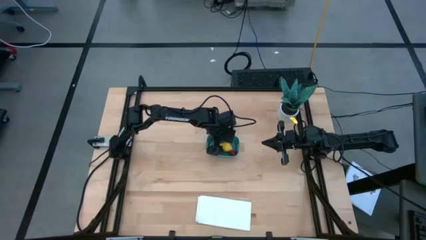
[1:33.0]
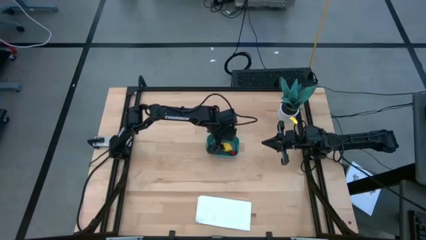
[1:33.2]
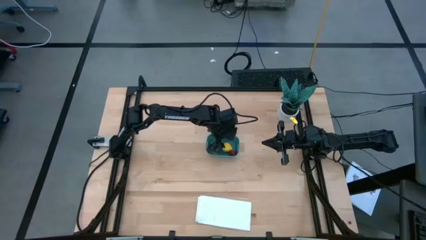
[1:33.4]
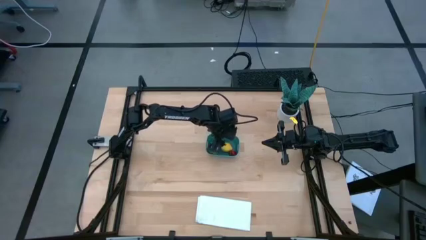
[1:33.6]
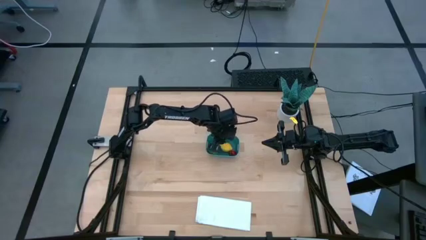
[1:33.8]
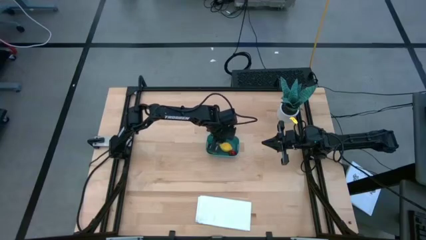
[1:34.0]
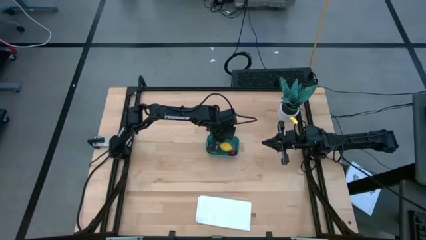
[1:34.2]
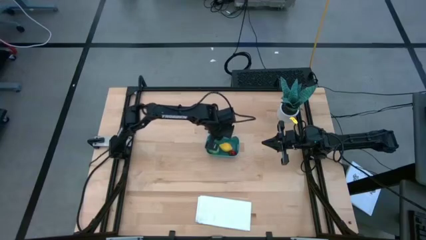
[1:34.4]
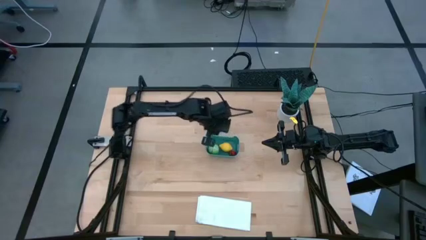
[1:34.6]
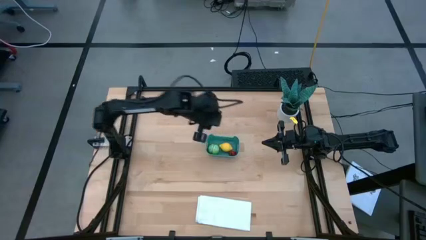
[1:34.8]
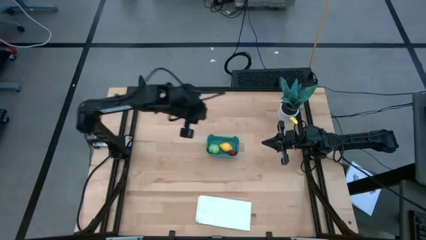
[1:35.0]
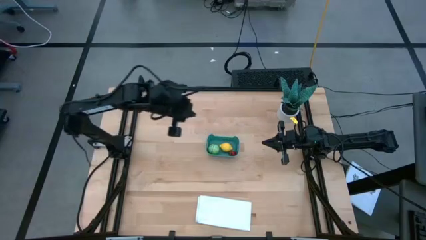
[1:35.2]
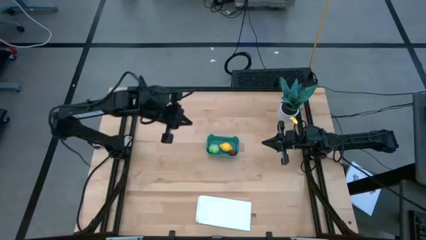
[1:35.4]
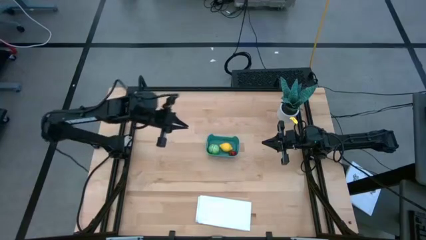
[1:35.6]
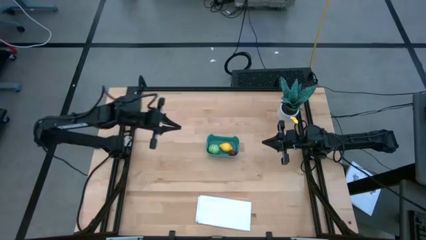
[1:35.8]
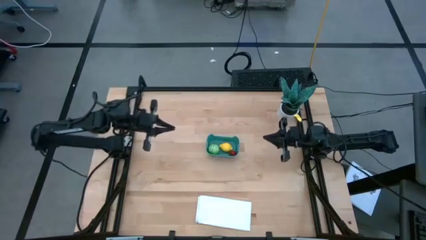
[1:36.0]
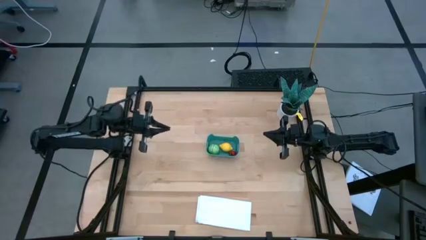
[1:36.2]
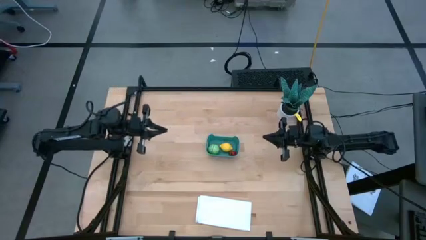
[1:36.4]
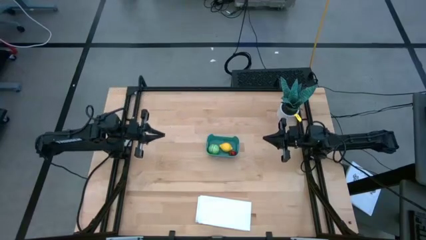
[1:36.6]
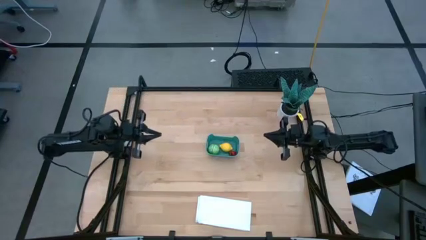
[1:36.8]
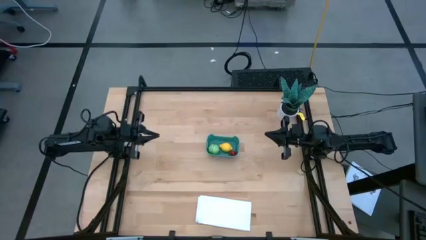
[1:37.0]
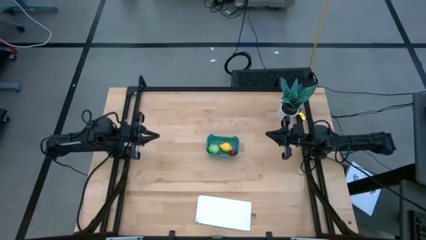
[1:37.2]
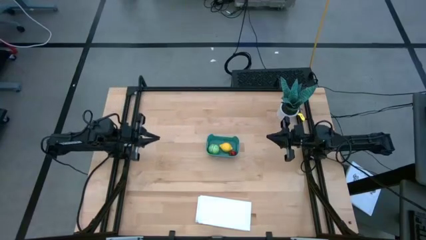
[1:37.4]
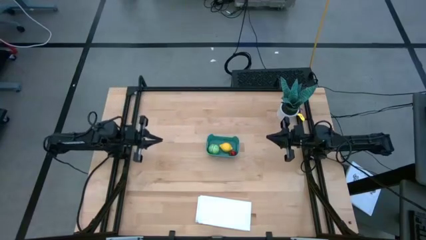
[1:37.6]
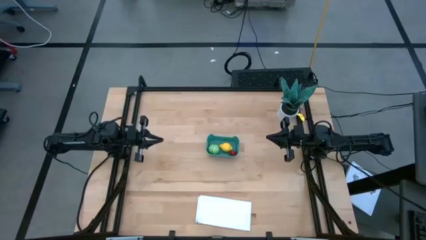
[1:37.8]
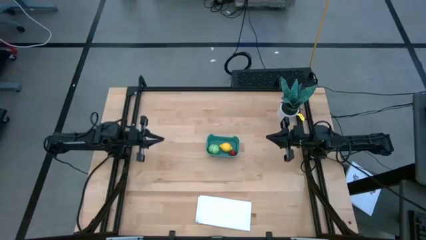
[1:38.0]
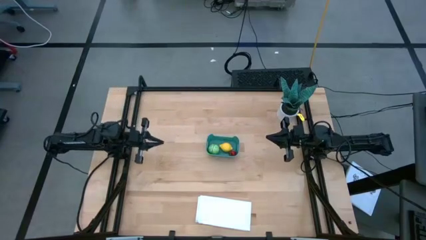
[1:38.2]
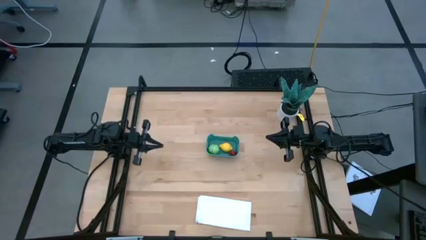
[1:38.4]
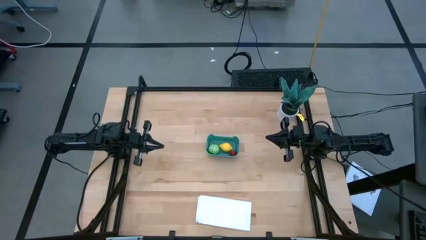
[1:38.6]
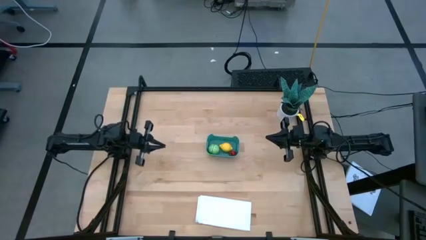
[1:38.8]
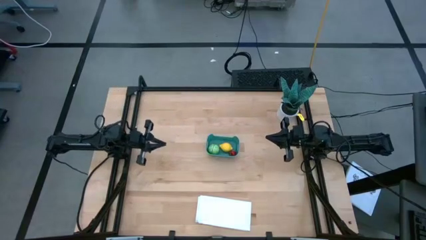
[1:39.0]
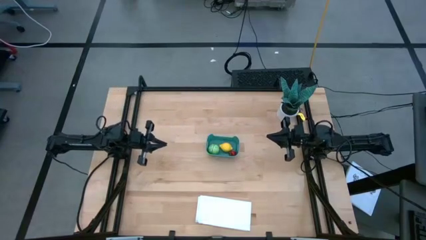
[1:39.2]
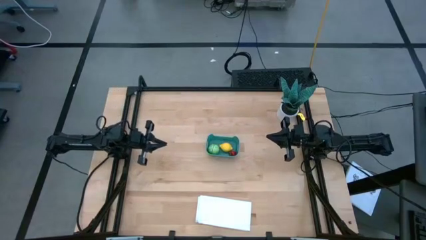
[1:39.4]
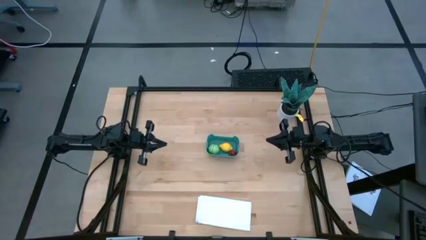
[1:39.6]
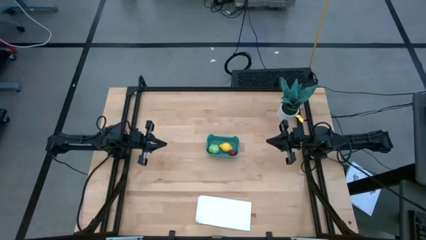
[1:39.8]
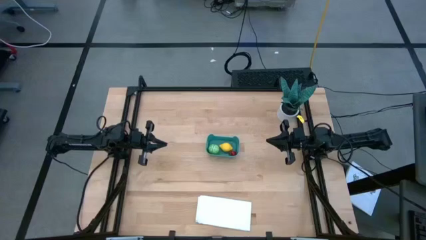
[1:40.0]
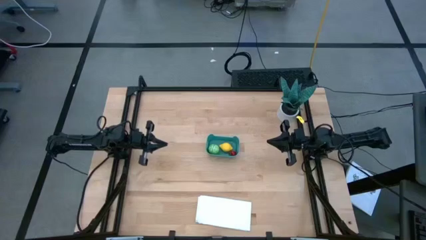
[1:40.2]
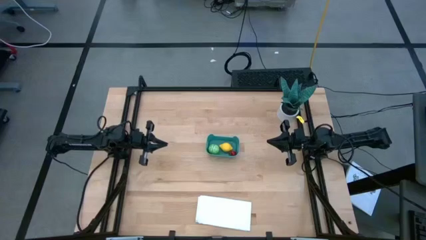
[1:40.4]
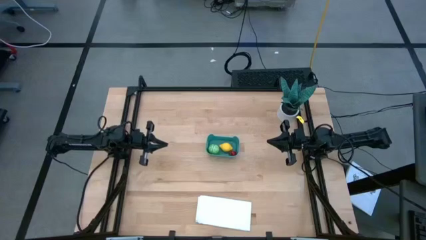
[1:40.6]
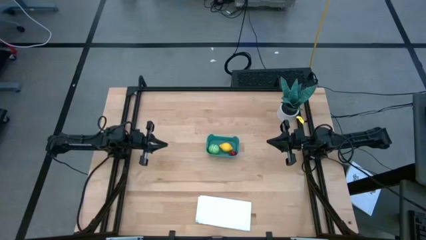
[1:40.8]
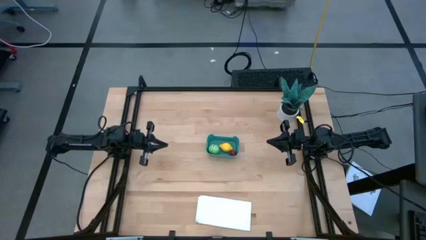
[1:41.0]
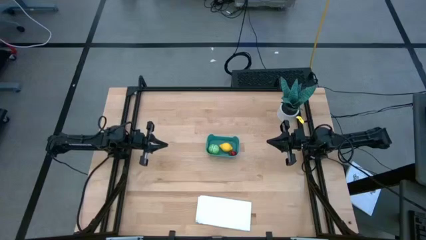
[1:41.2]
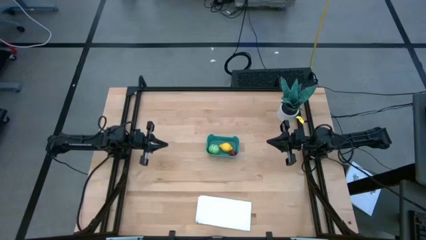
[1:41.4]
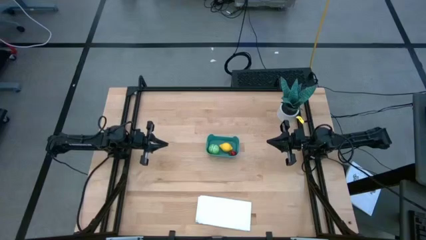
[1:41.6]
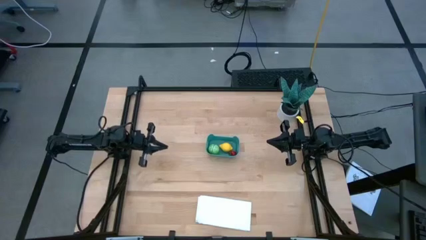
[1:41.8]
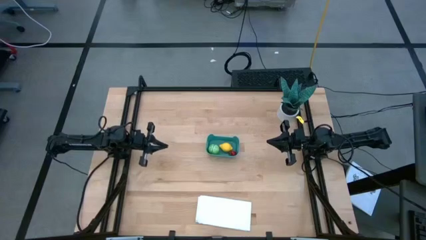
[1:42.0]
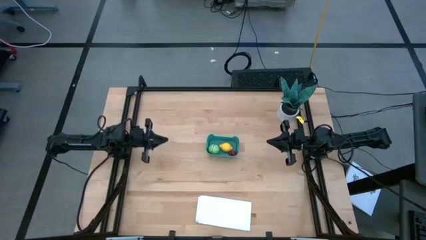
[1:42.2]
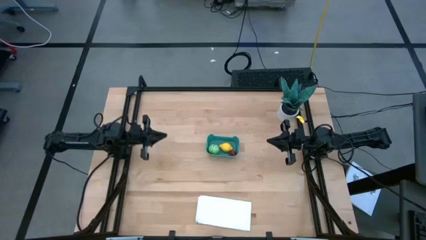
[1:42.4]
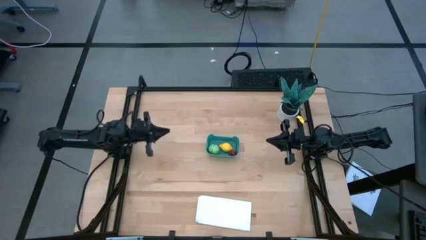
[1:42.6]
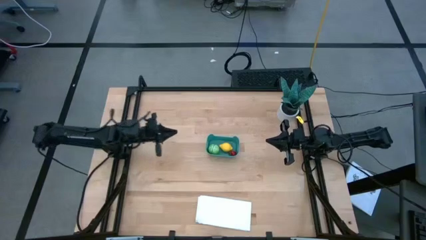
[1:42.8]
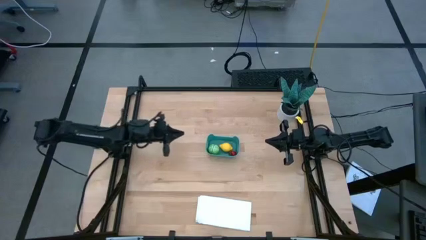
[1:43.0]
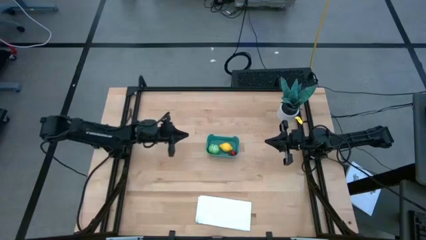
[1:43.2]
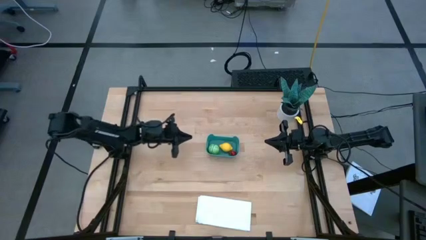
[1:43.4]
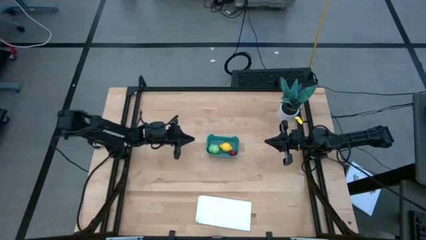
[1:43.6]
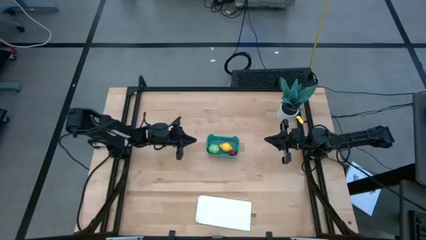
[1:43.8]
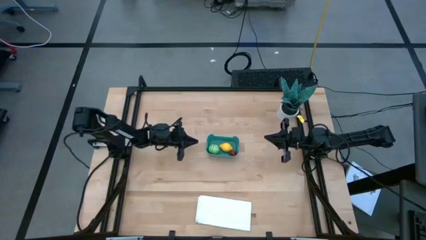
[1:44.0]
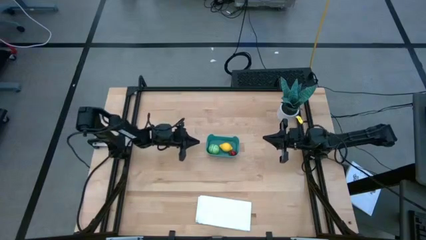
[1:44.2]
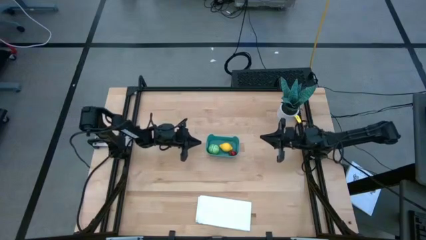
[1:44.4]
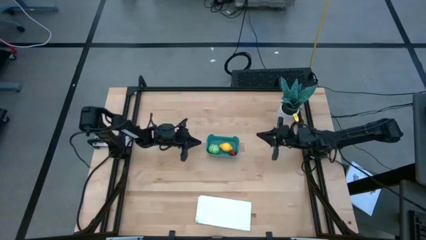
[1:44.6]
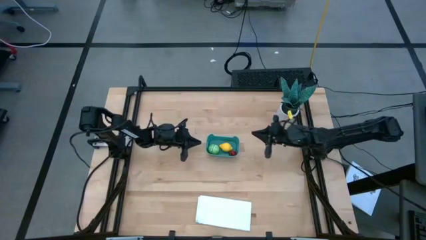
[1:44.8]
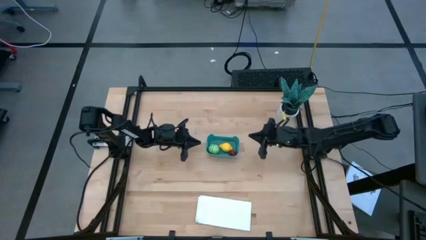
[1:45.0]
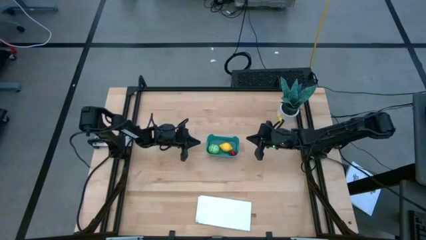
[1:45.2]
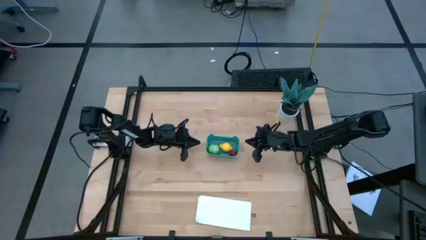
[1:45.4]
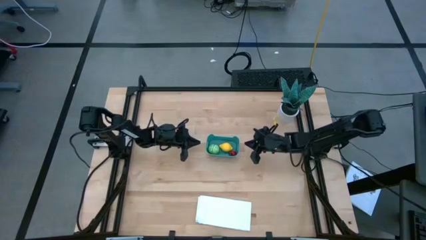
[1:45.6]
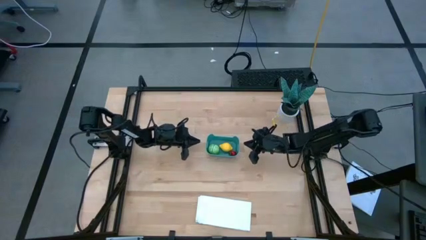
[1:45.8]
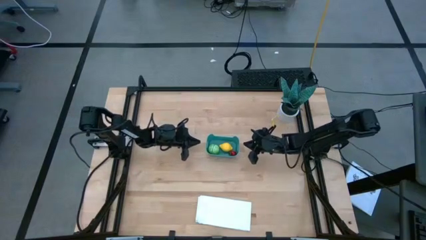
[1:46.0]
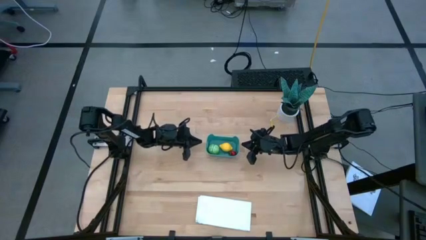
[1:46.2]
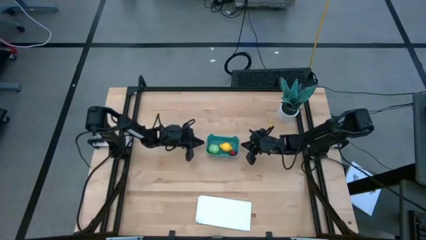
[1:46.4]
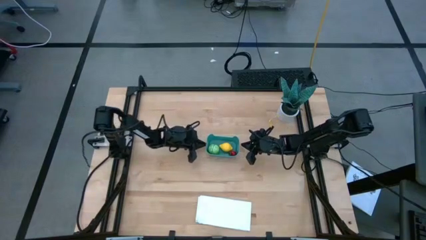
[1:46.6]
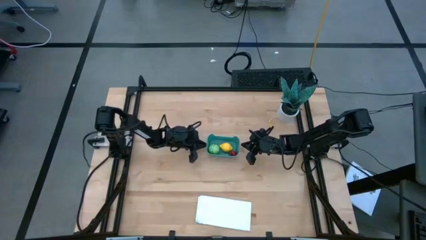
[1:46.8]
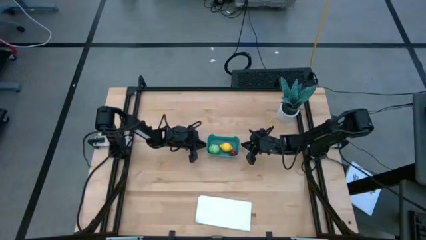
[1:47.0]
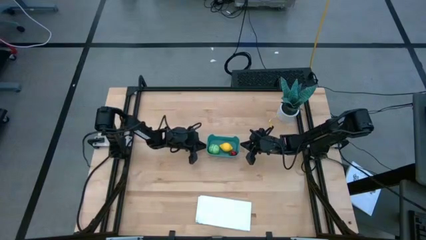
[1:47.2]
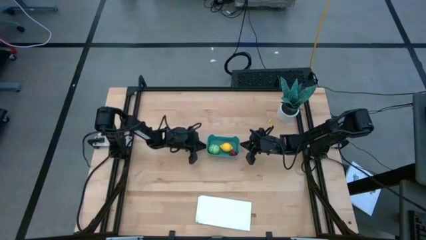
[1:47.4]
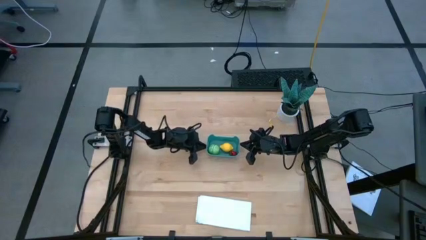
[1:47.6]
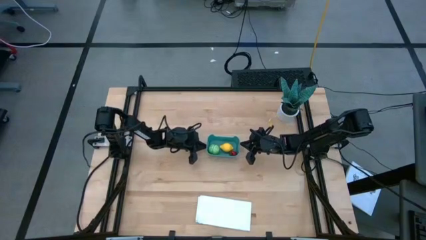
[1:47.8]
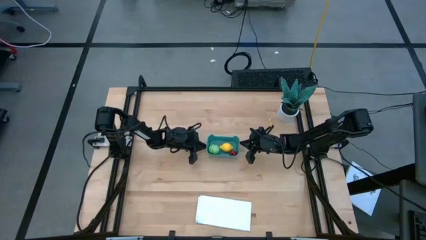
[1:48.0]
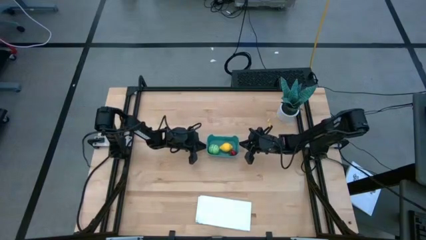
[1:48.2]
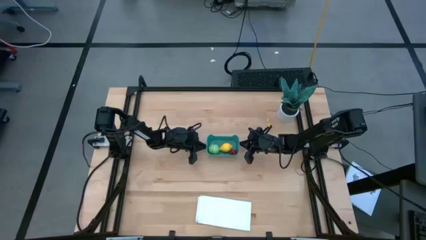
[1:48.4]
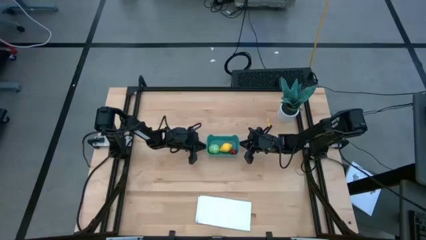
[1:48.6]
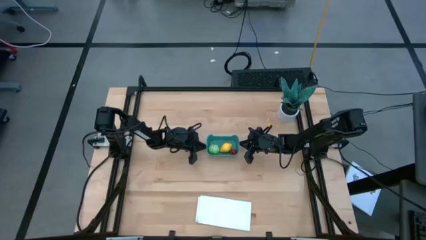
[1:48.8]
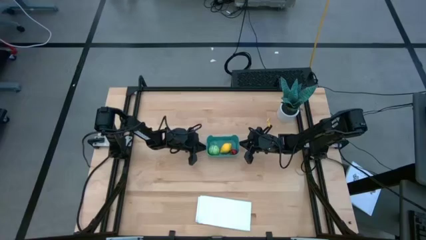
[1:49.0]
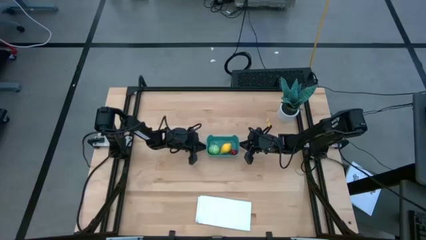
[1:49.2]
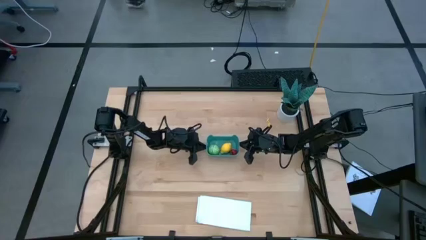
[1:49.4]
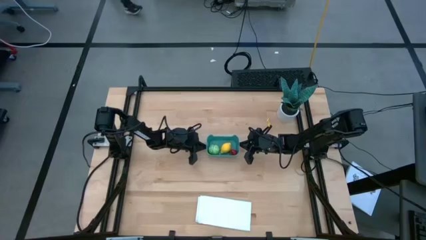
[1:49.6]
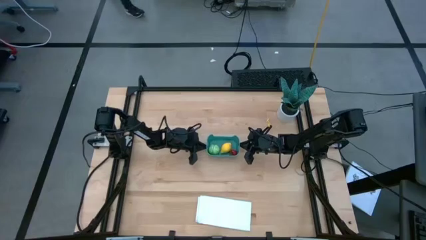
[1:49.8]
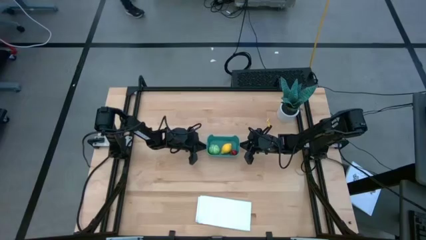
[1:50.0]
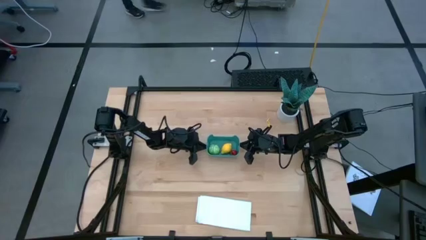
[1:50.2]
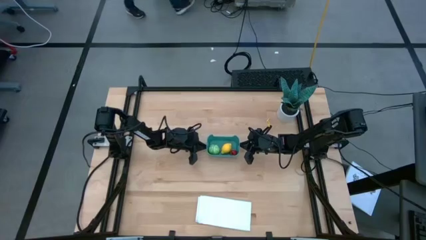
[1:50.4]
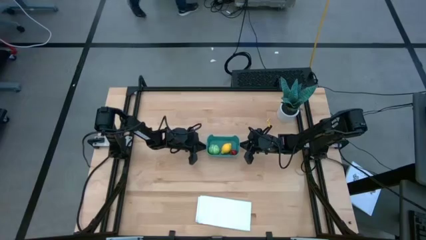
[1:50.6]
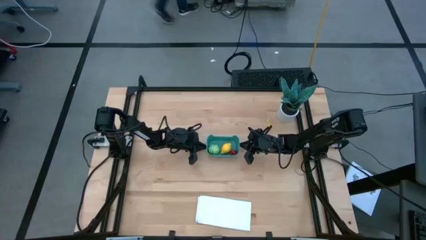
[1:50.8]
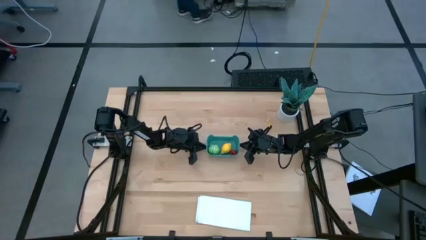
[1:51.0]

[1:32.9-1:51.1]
Task: Pick and placing Produce into tupperware
Adjust the blue bin
